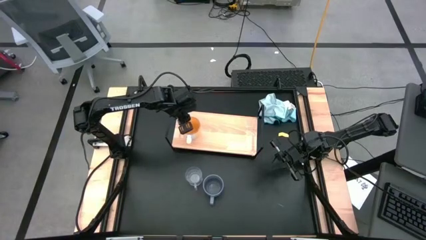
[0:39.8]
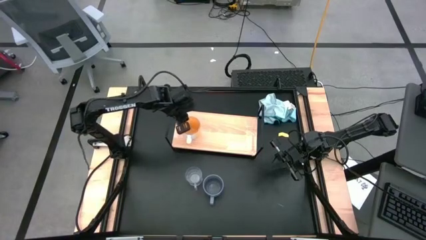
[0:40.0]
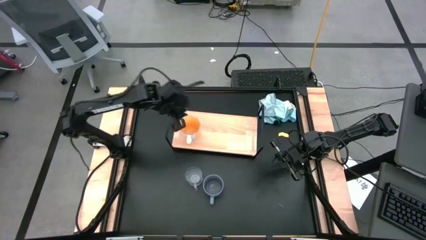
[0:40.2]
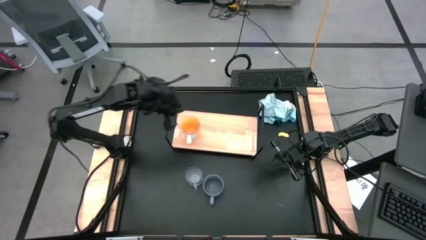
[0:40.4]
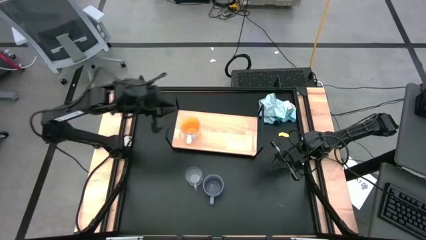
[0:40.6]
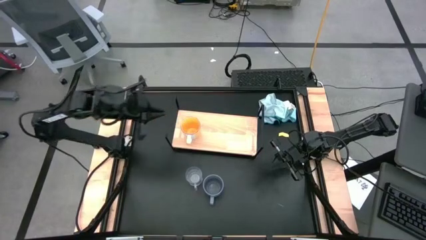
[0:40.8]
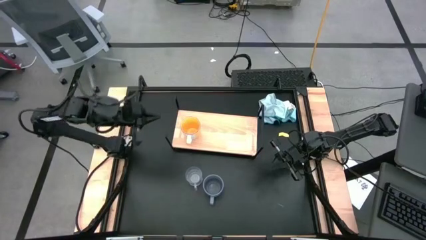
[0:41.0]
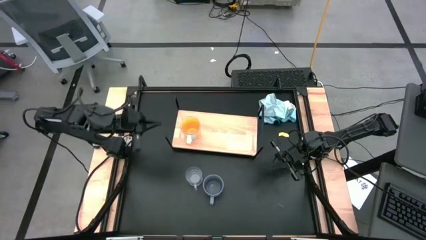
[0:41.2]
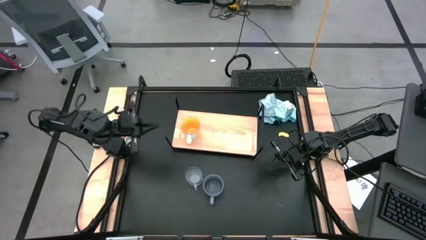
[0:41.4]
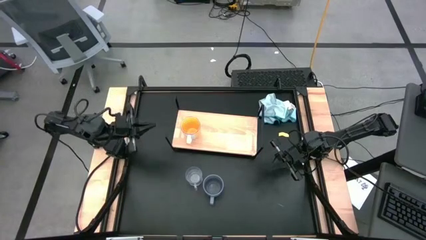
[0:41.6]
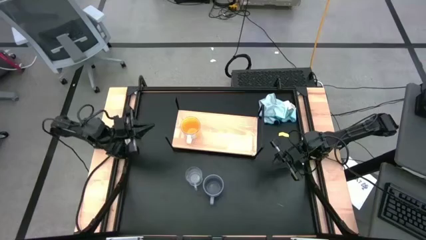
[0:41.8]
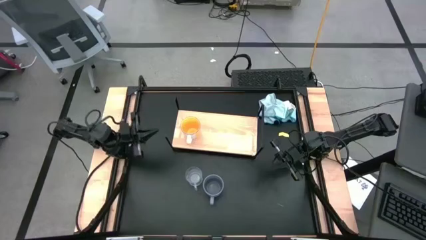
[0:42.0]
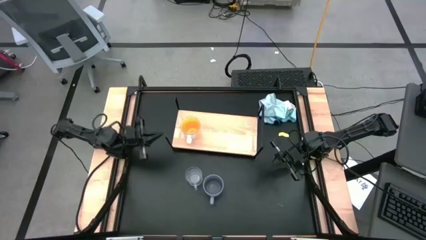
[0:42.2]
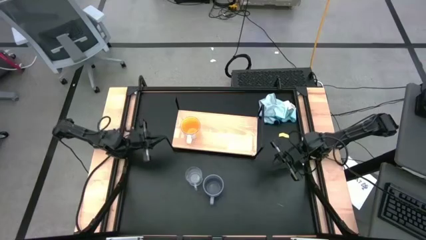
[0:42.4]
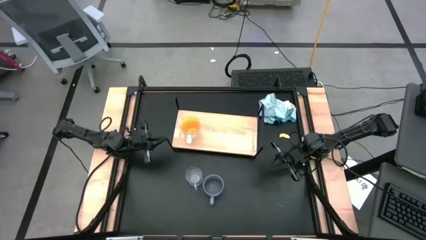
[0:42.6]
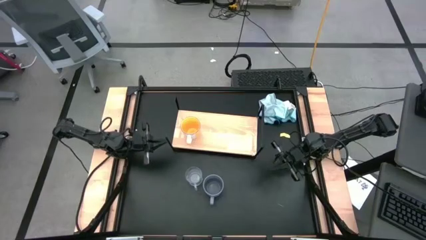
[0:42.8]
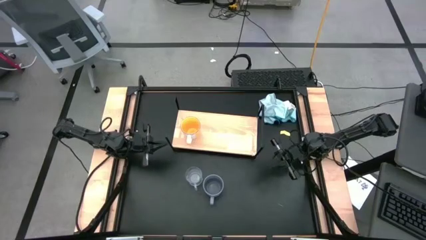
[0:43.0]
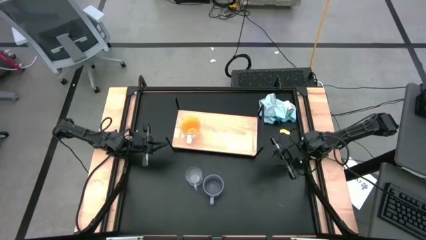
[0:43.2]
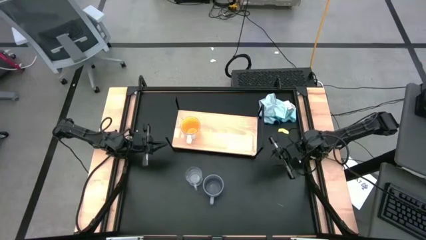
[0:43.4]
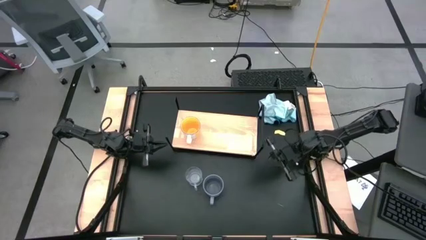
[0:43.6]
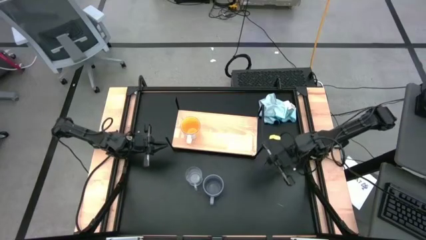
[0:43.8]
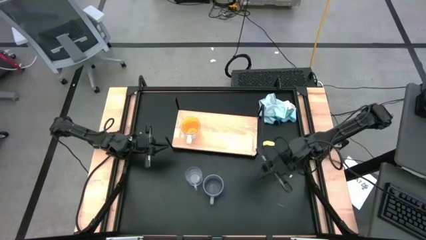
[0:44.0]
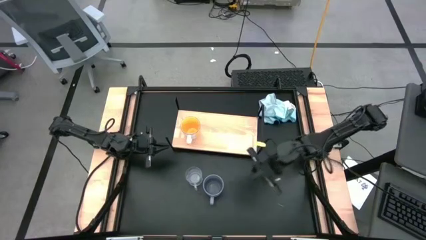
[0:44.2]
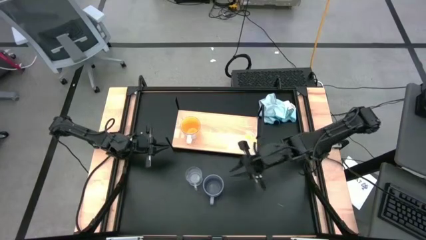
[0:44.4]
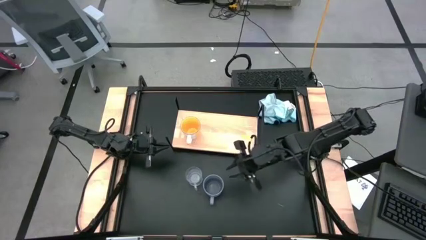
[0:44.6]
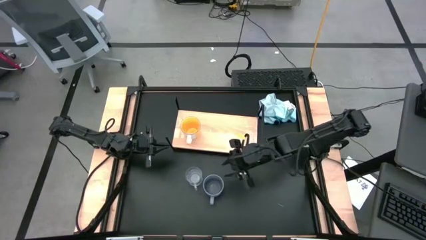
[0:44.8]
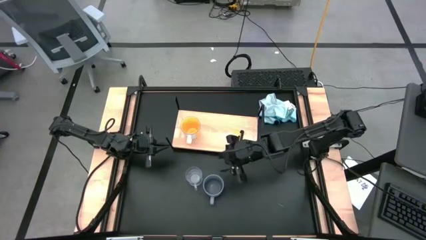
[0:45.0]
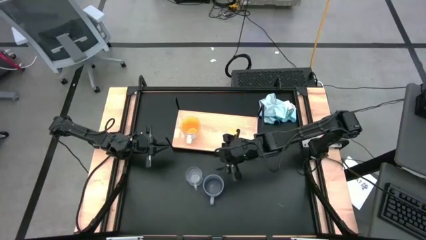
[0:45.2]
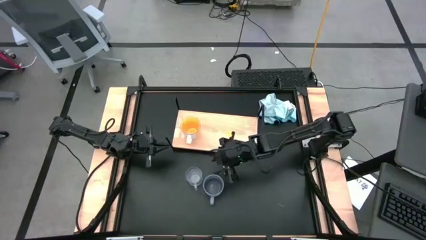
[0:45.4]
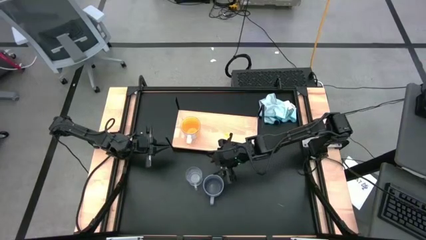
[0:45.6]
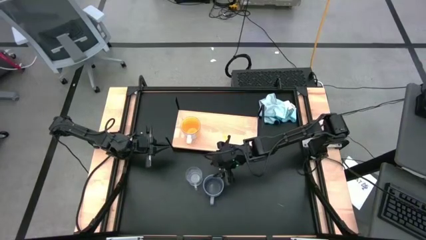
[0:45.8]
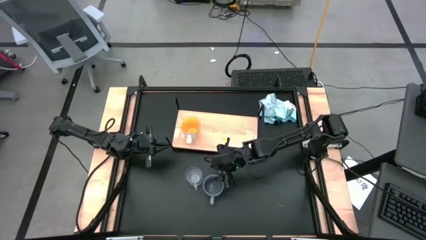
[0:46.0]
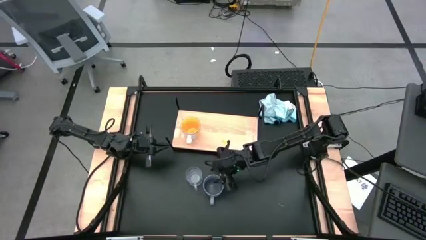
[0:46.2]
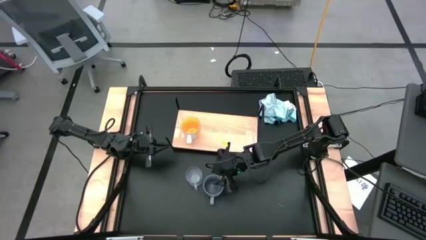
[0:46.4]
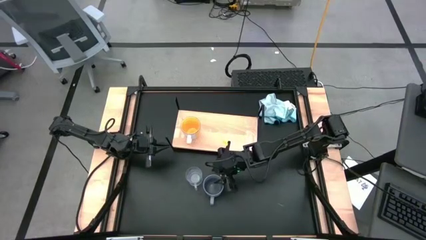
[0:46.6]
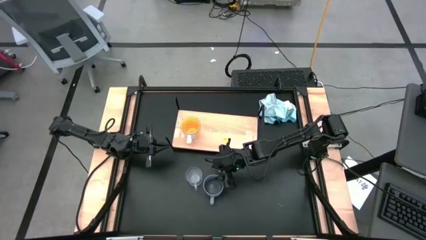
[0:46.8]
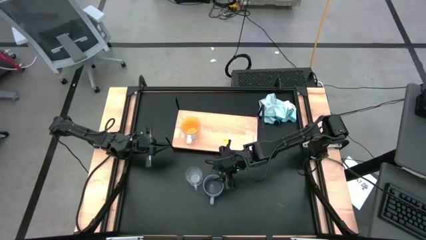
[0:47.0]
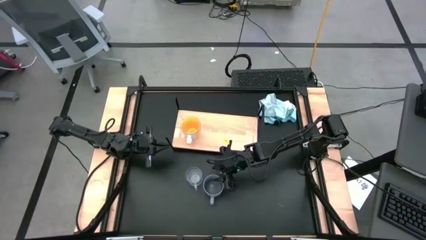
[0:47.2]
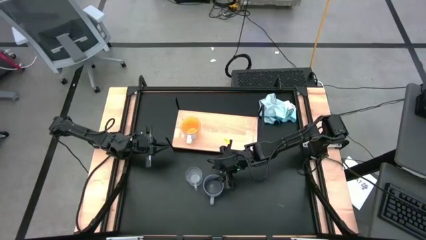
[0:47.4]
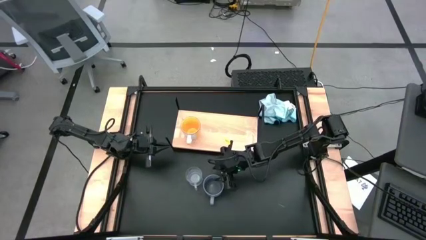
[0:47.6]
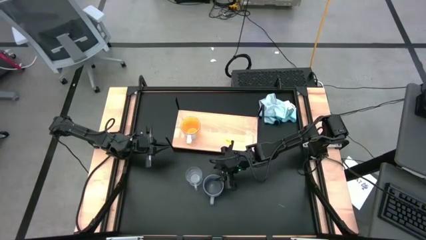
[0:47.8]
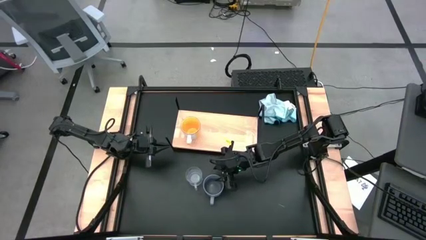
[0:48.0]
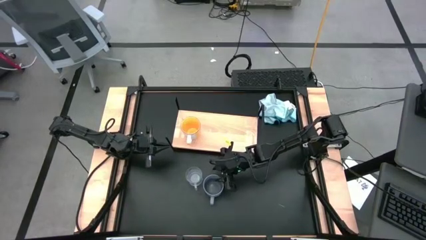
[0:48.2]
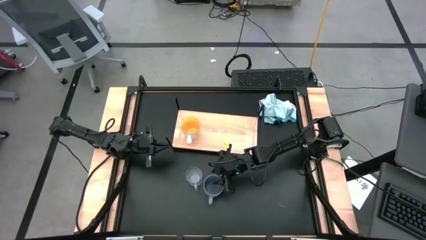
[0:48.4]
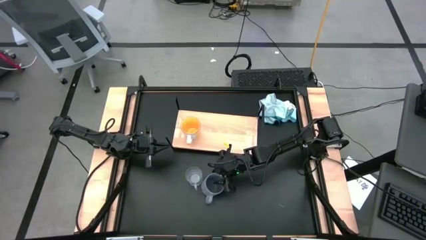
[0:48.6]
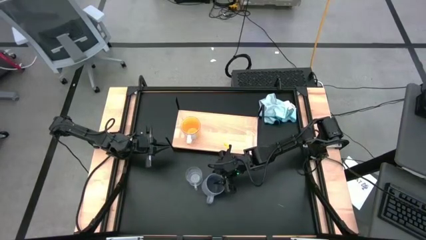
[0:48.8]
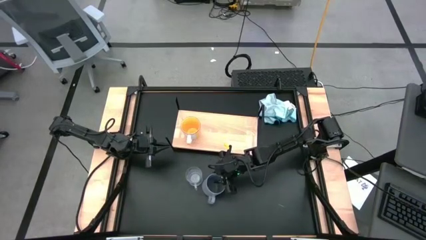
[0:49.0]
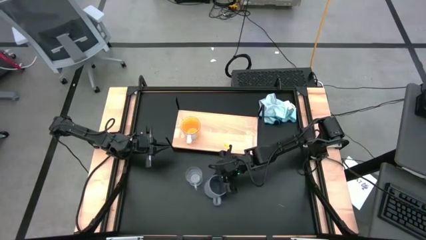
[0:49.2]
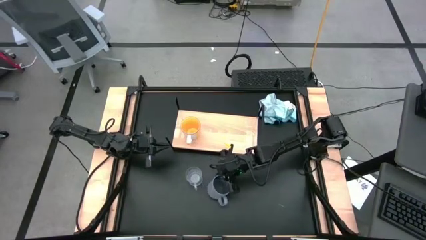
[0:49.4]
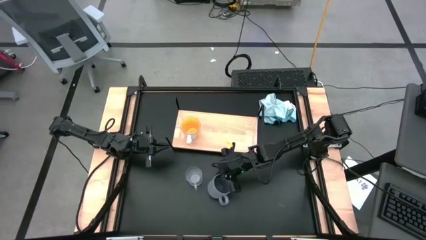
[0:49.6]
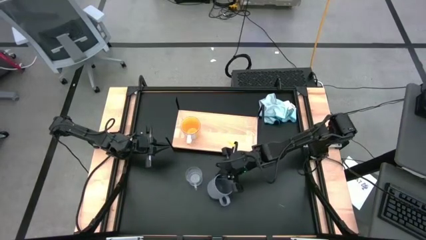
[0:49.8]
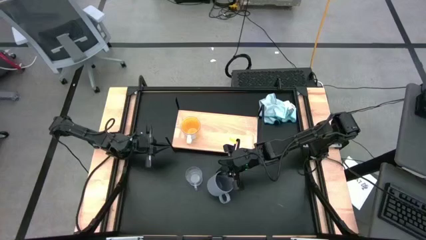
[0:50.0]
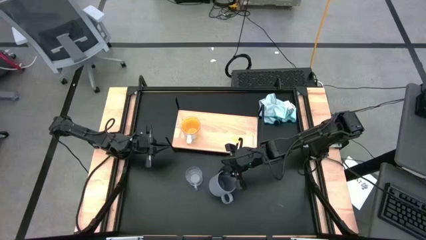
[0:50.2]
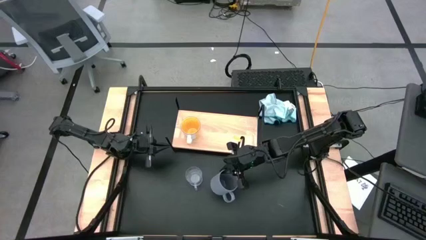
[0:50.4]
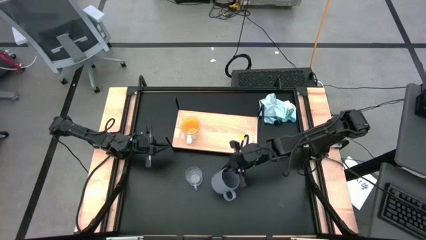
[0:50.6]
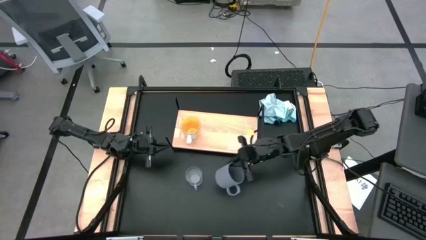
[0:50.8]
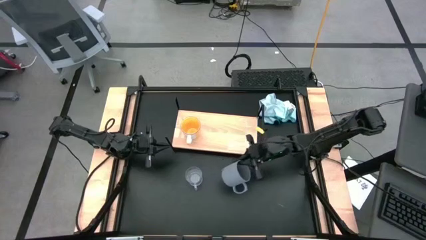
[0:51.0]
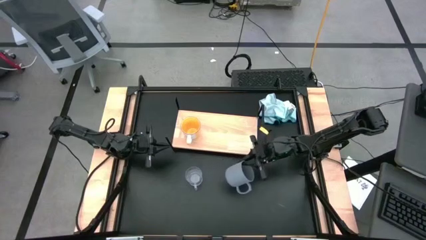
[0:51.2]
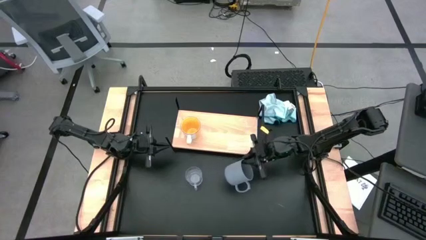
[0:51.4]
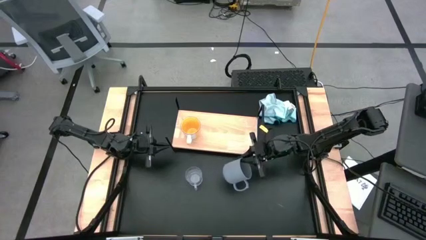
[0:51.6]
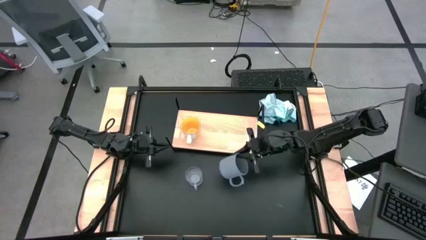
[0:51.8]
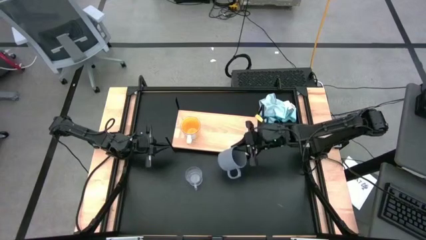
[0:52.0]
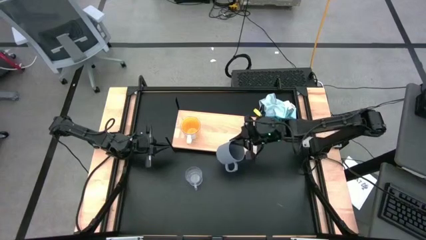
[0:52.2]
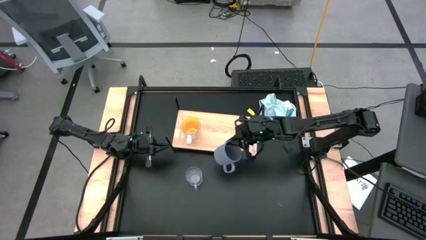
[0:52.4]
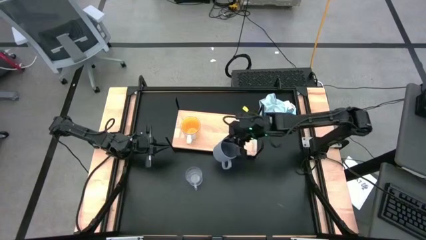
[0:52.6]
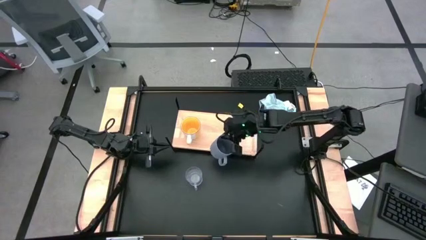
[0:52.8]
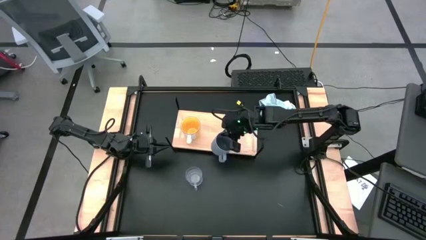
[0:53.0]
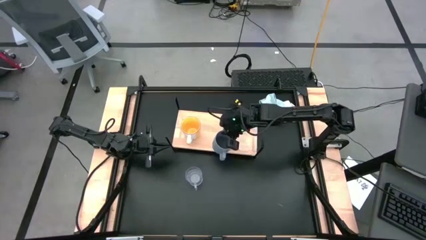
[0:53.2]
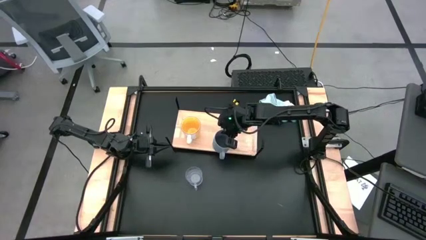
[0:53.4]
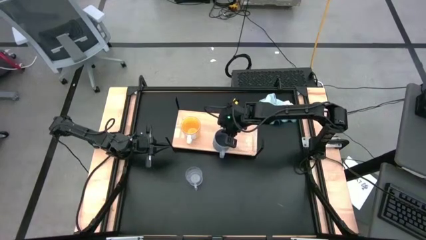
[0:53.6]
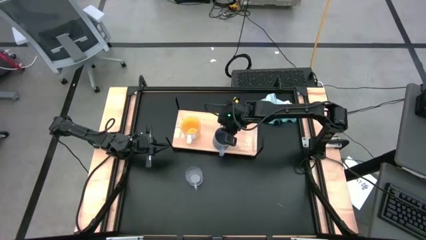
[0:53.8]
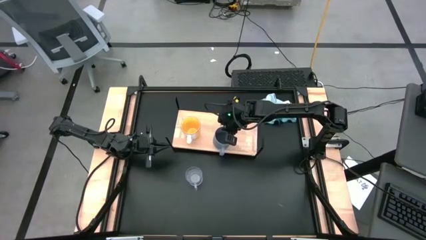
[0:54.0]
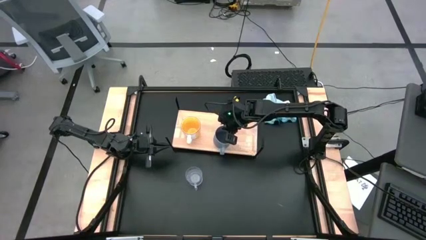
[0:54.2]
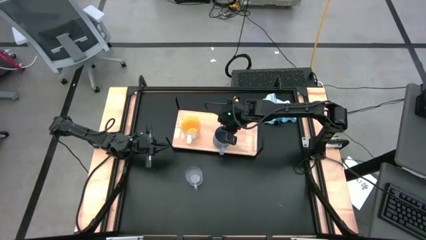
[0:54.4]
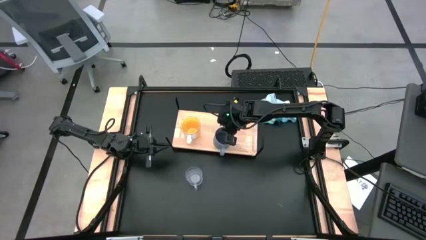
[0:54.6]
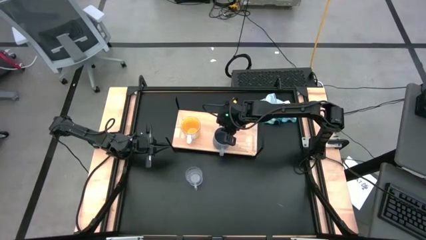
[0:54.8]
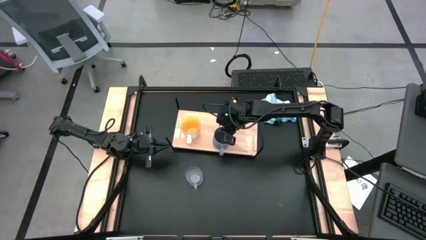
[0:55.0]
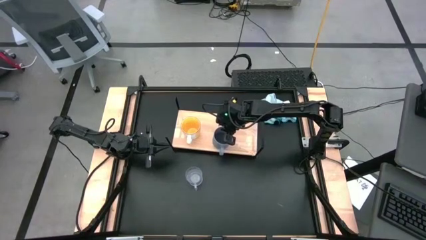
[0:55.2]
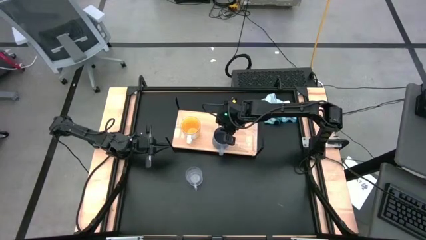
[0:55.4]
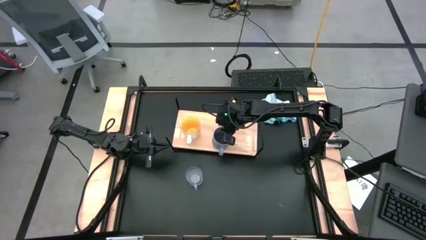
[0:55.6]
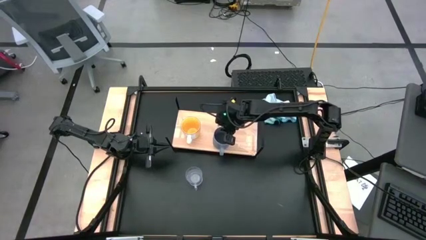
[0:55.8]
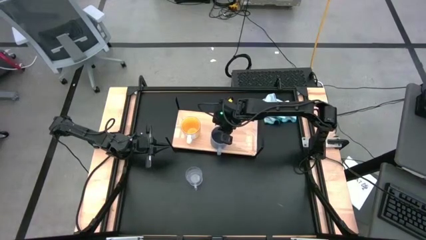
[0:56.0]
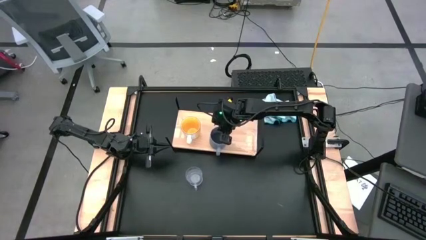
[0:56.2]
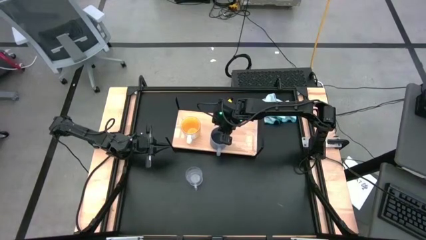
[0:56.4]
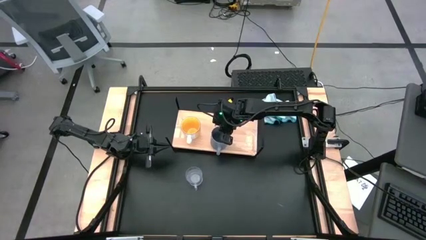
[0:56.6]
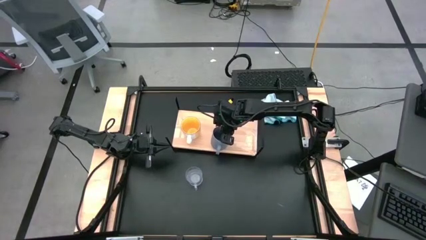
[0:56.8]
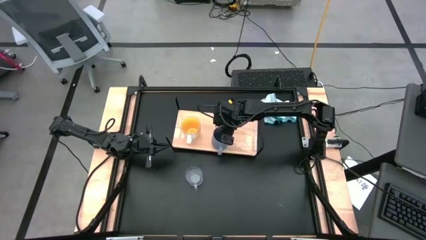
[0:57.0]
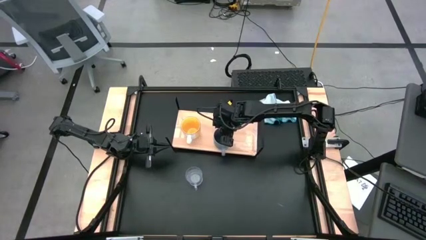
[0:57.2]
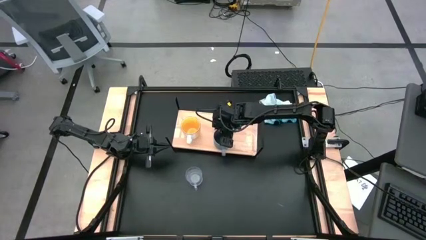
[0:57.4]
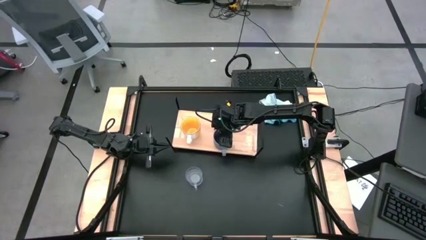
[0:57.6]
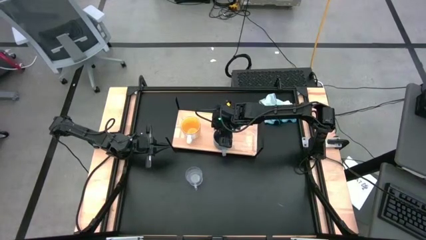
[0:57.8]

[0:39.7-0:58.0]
Task: Stack small to large cups/mugs on shelf
Put the gray mug on the shelf
